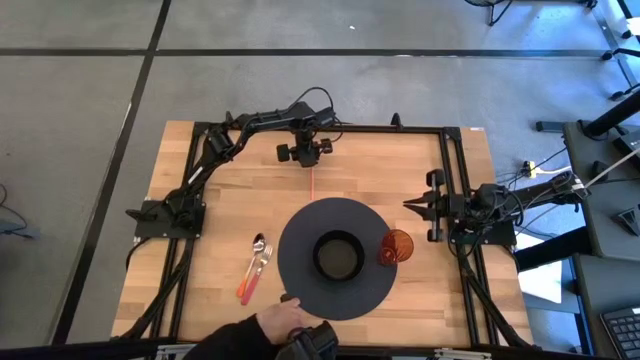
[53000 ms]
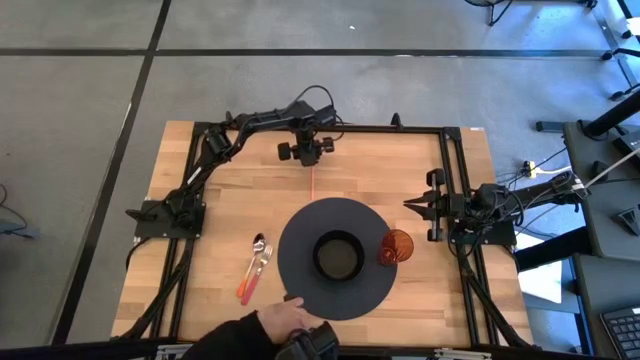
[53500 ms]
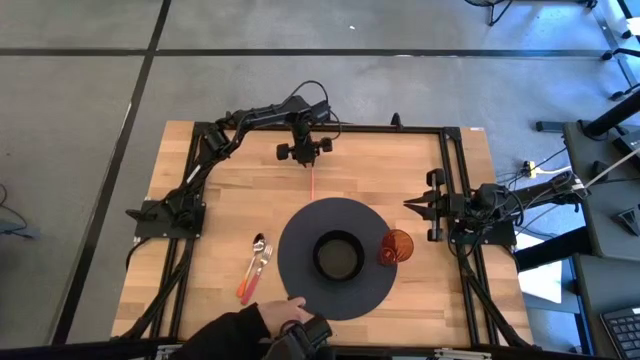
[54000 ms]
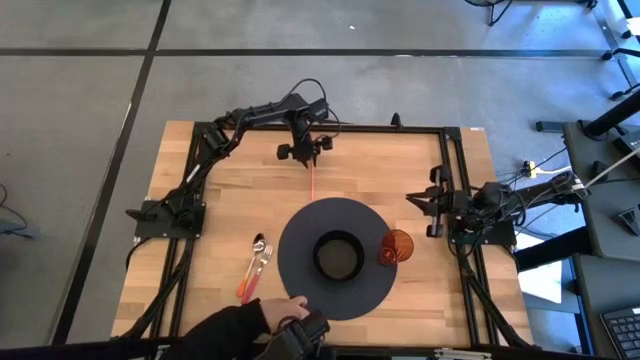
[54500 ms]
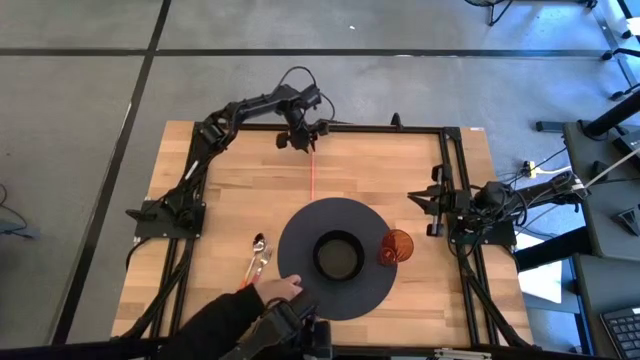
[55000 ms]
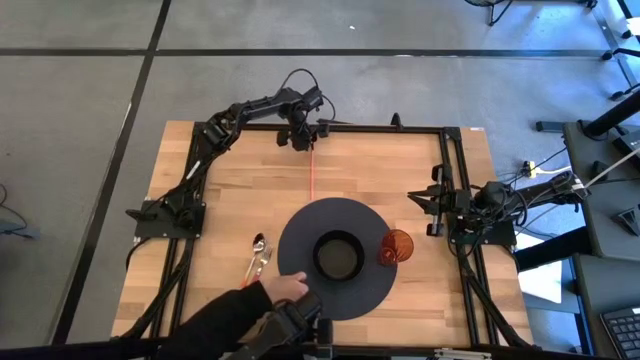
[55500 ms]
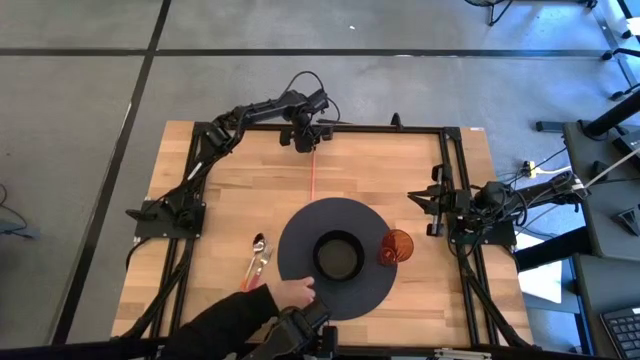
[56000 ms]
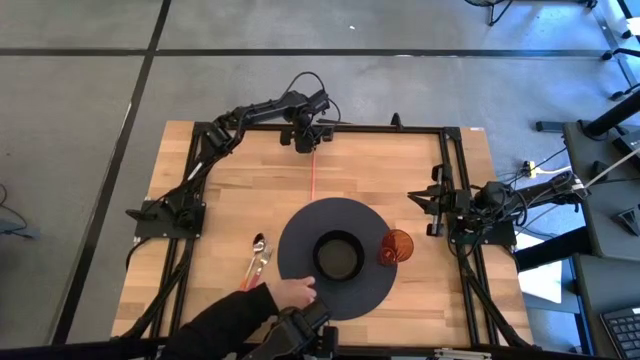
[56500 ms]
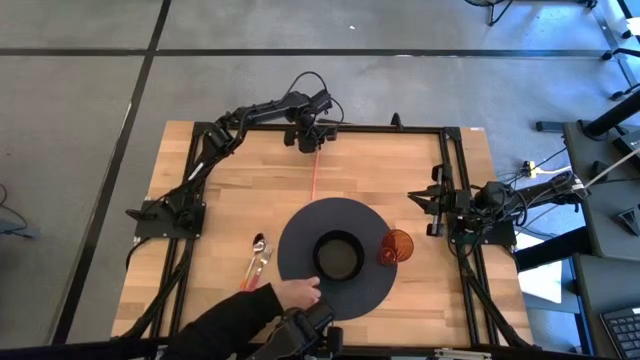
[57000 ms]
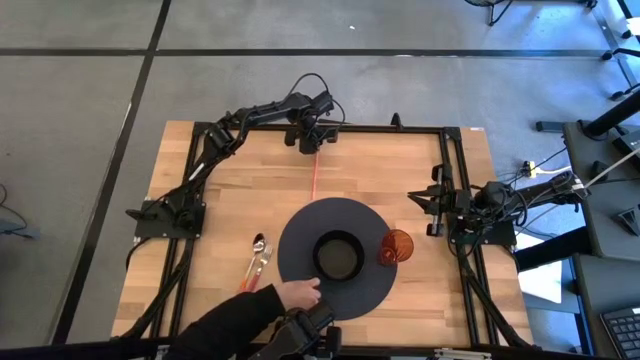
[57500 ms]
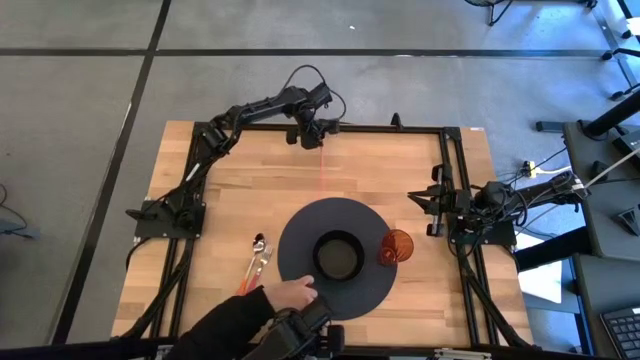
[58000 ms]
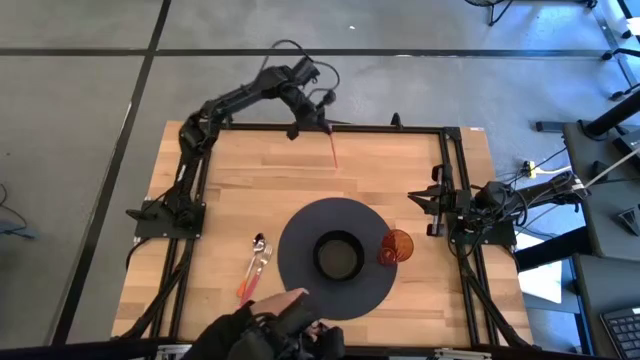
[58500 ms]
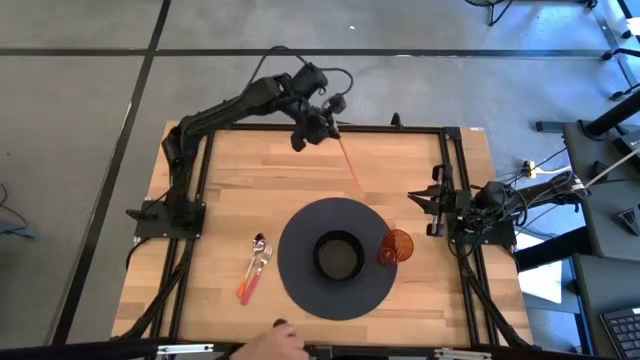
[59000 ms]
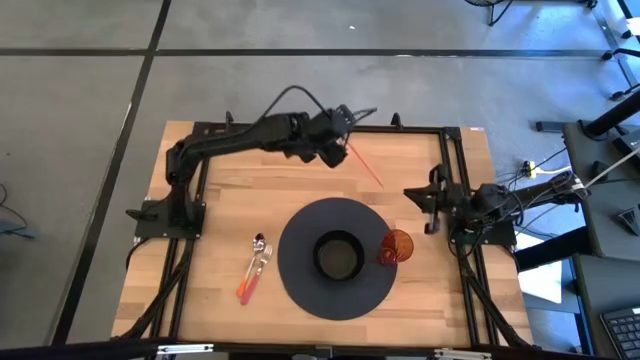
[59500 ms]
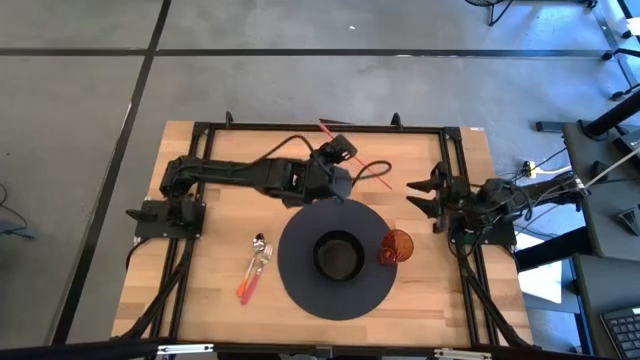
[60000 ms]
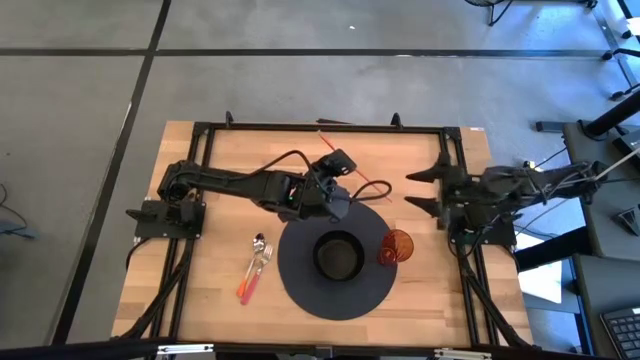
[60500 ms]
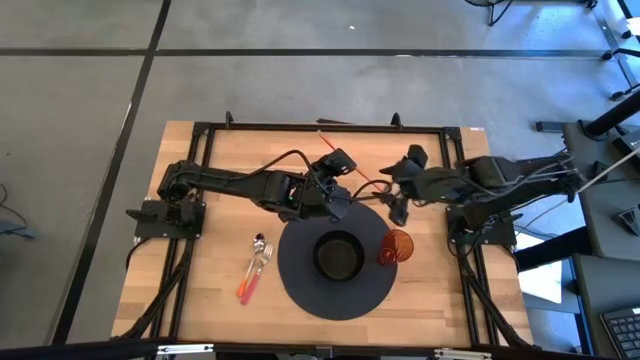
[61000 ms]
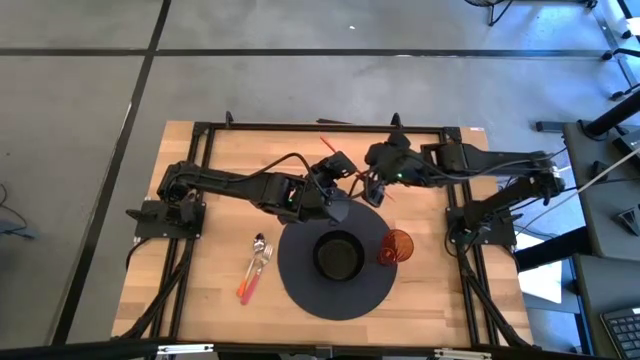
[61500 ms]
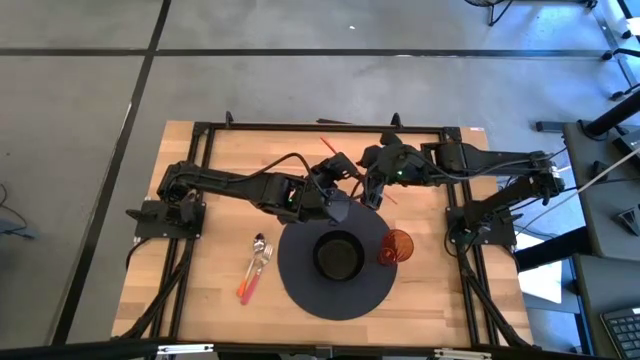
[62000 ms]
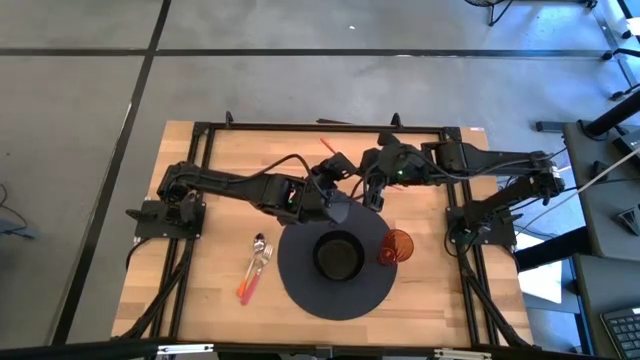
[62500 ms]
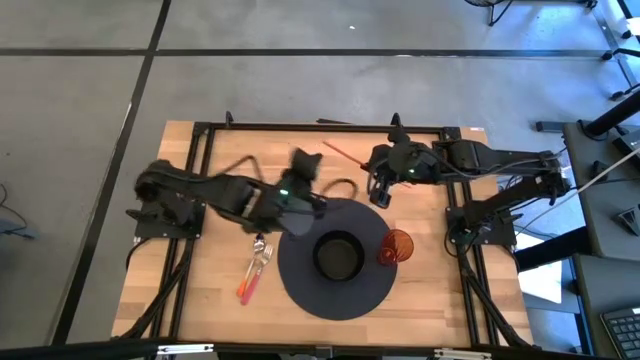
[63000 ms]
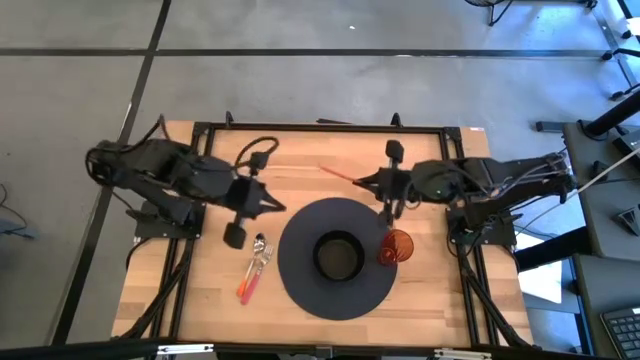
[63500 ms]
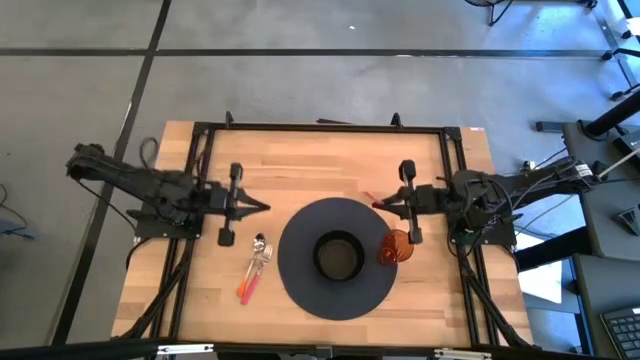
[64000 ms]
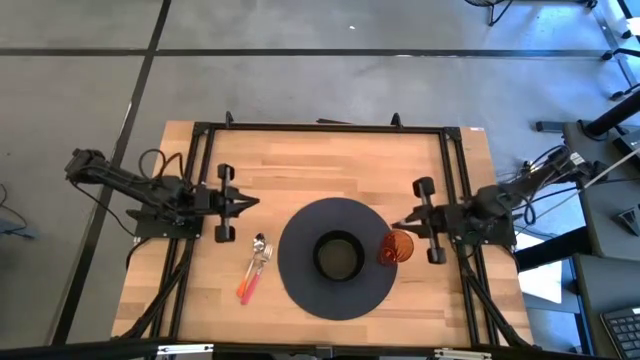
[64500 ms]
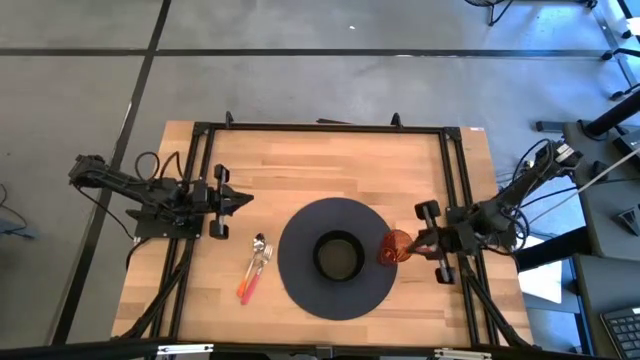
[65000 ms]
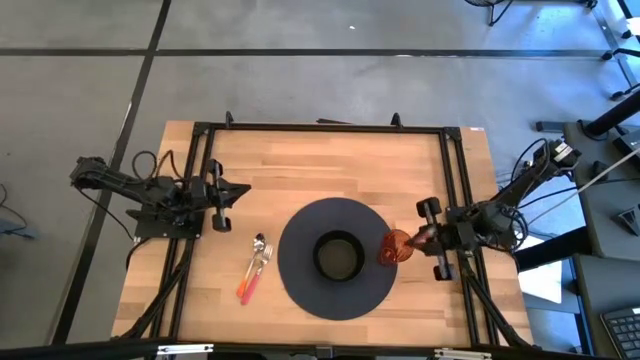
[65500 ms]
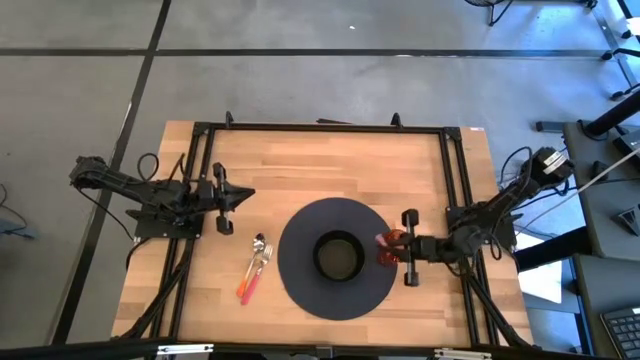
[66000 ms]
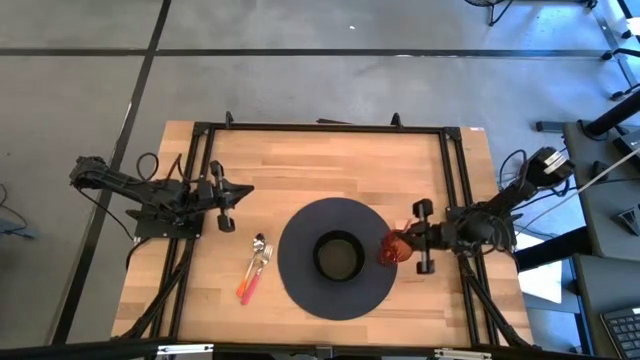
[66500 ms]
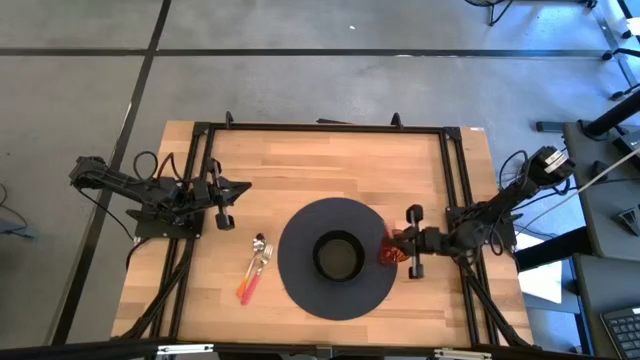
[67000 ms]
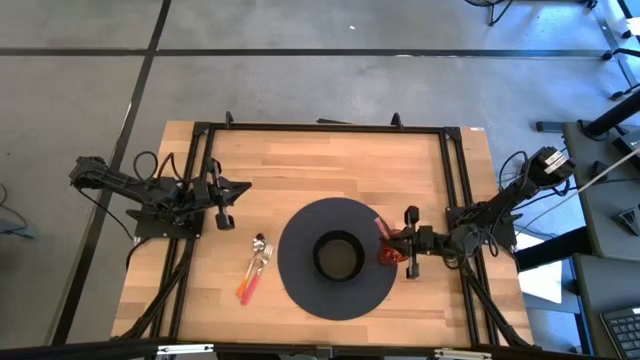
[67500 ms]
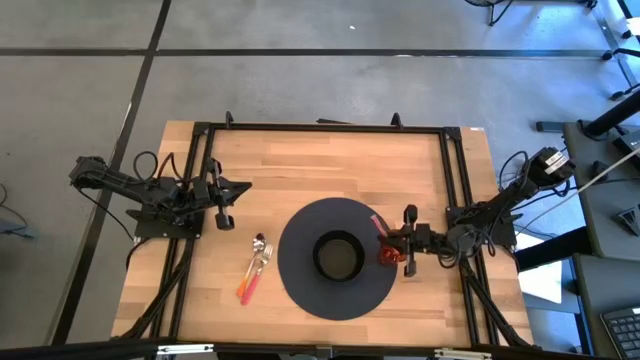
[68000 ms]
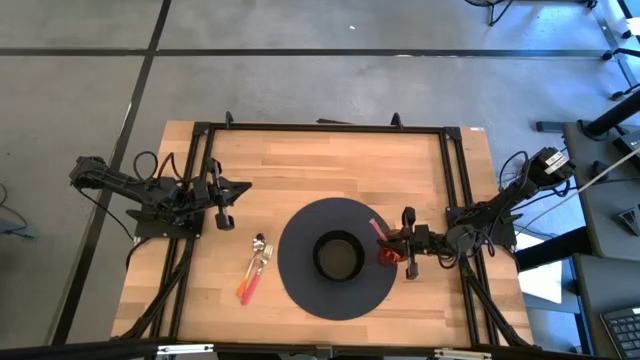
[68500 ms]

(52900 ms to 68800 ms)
Task: Pick & Place Utensil
Put the red straw into the orange cup on the mat
